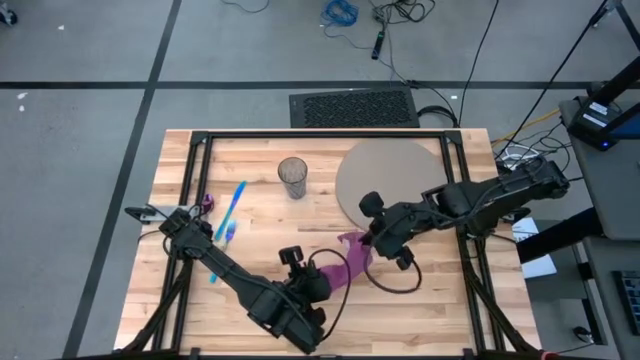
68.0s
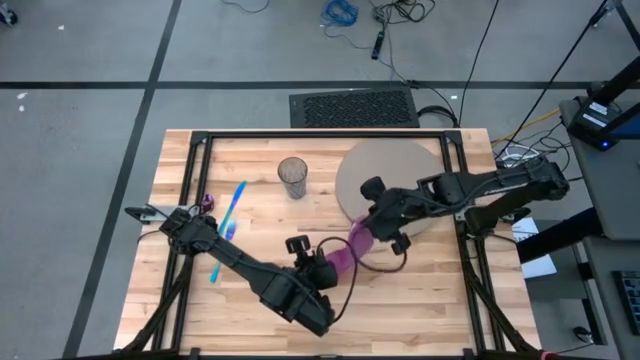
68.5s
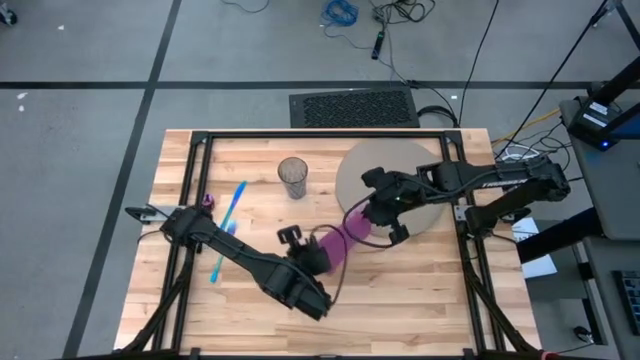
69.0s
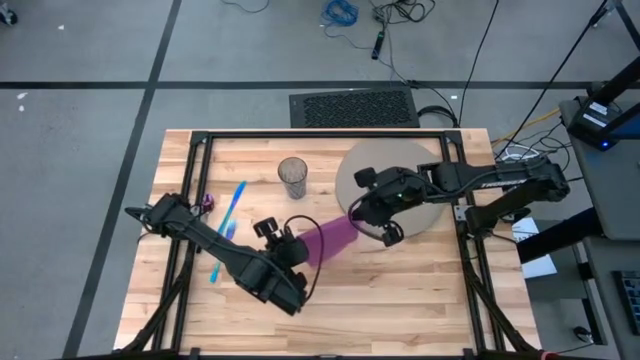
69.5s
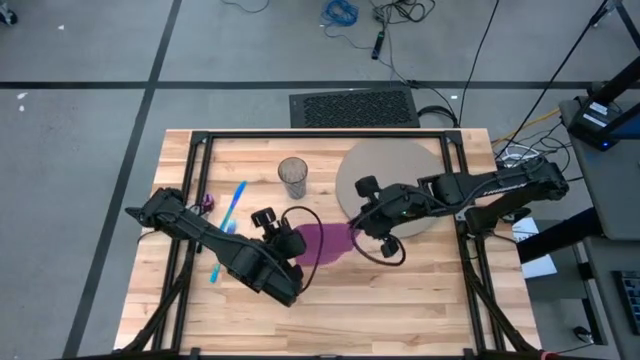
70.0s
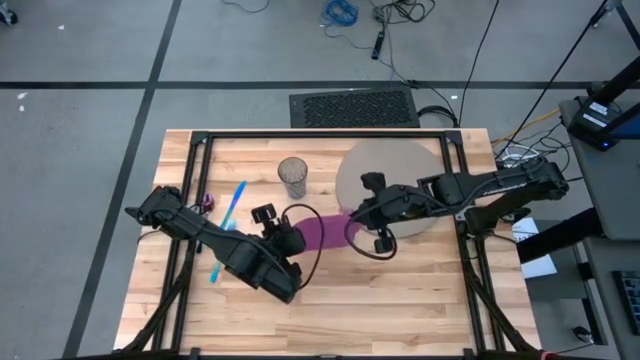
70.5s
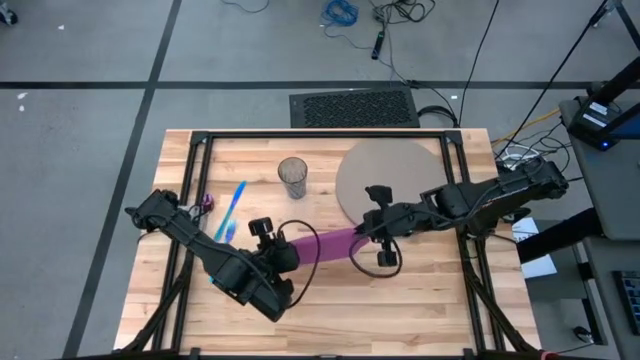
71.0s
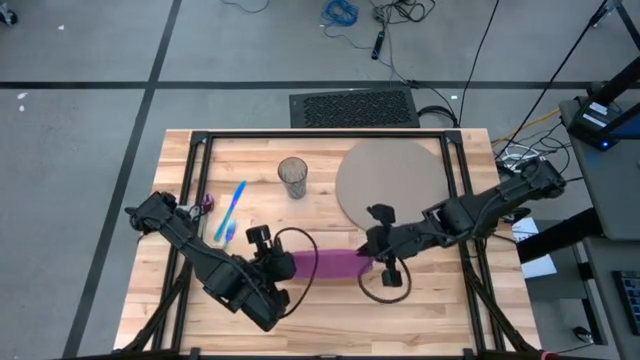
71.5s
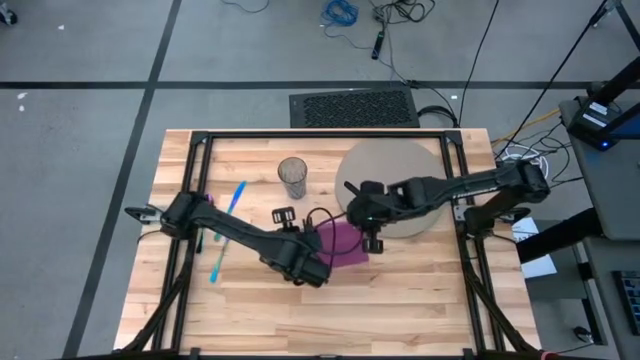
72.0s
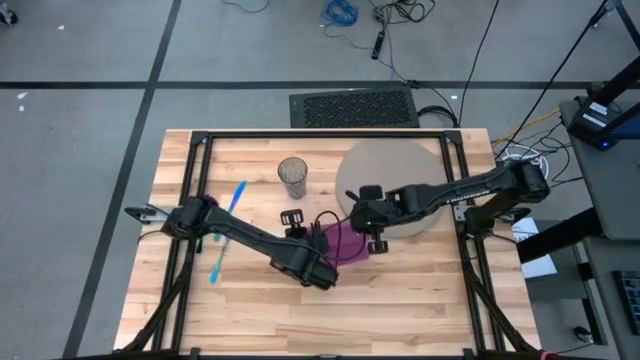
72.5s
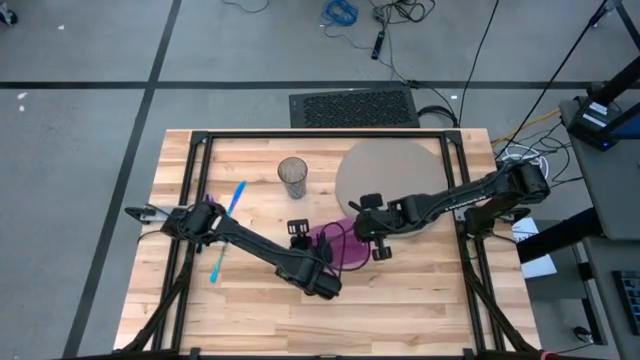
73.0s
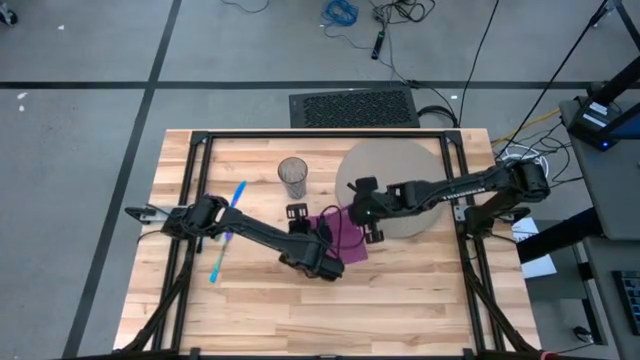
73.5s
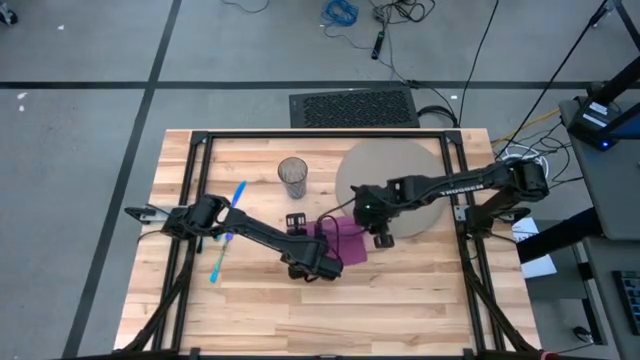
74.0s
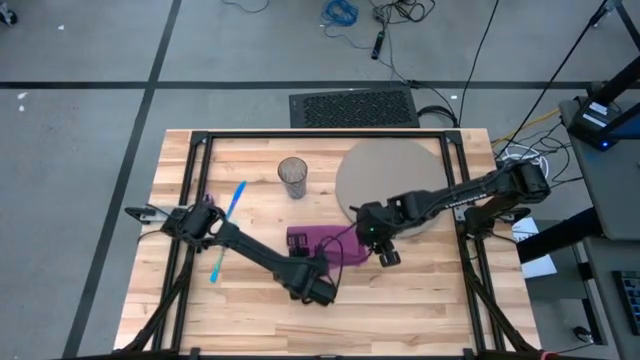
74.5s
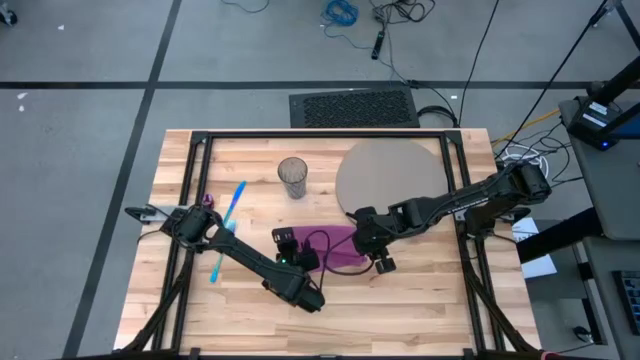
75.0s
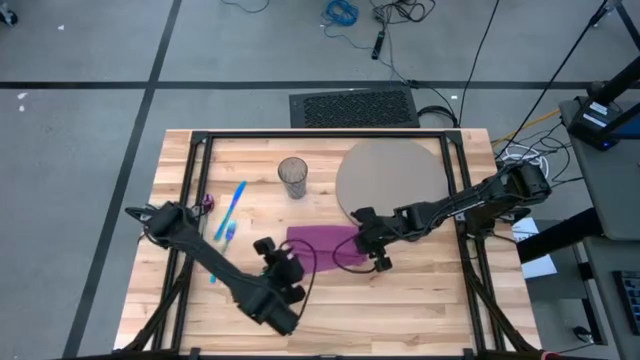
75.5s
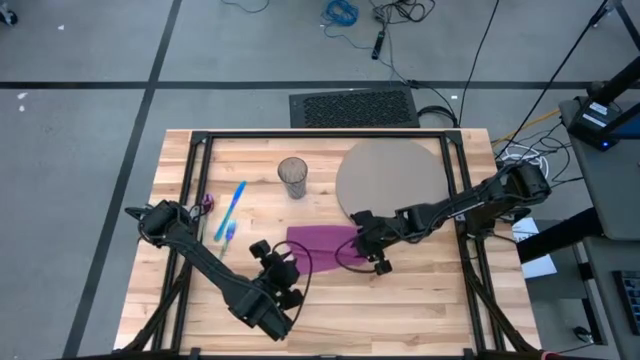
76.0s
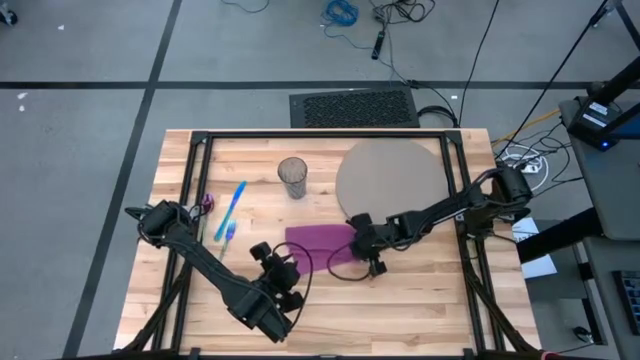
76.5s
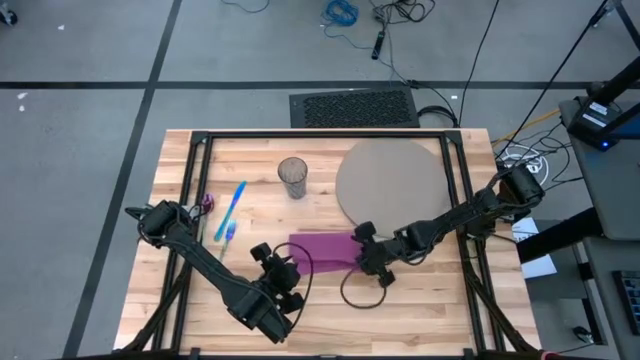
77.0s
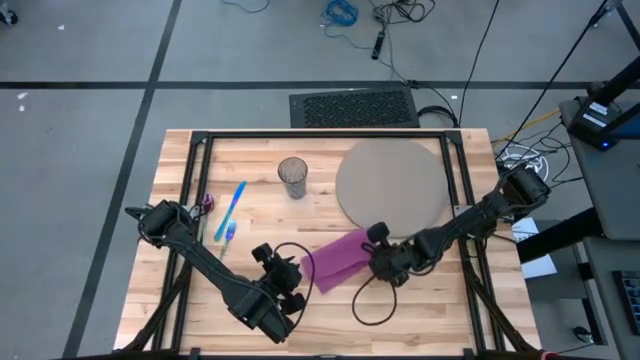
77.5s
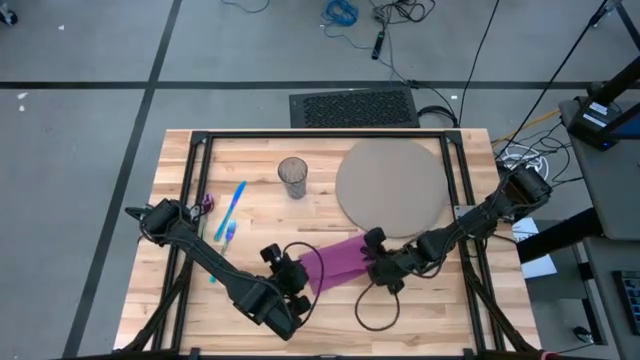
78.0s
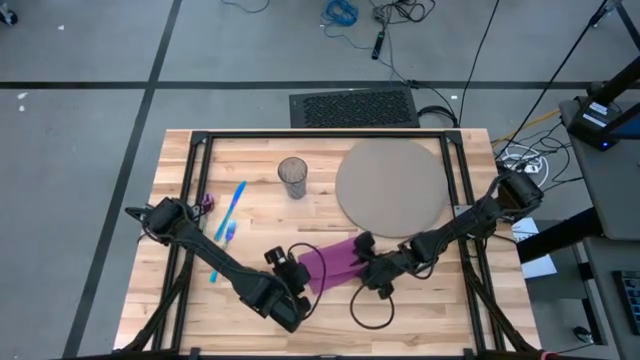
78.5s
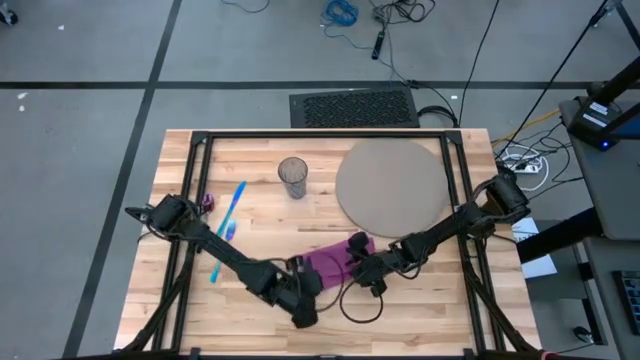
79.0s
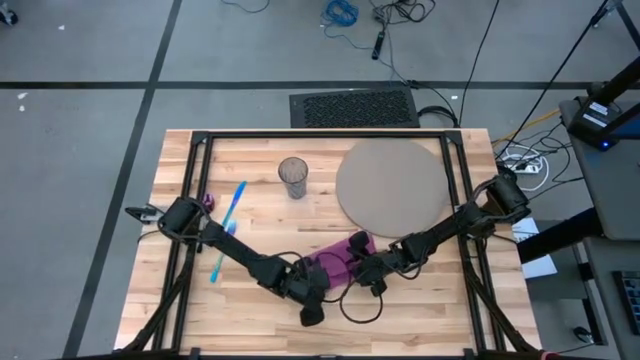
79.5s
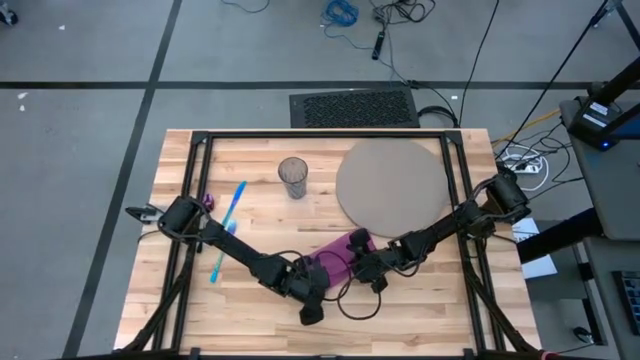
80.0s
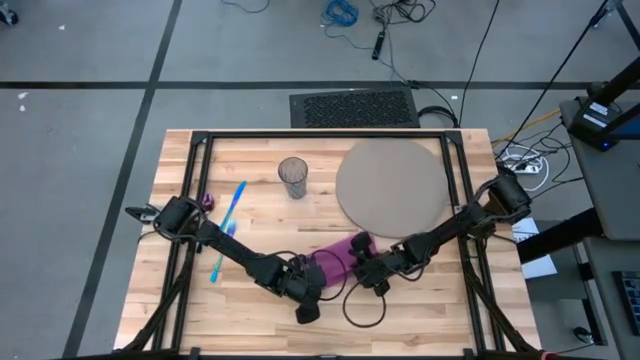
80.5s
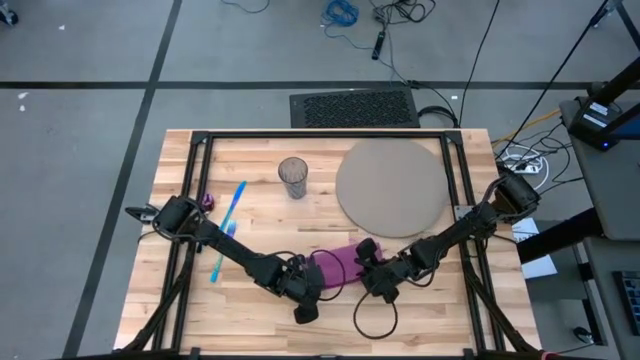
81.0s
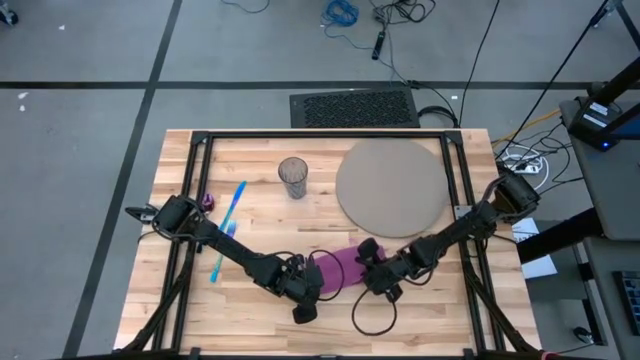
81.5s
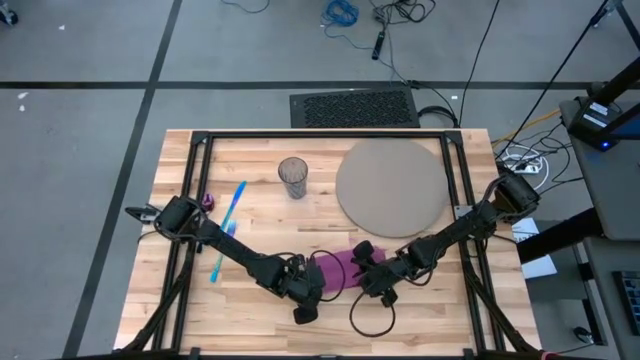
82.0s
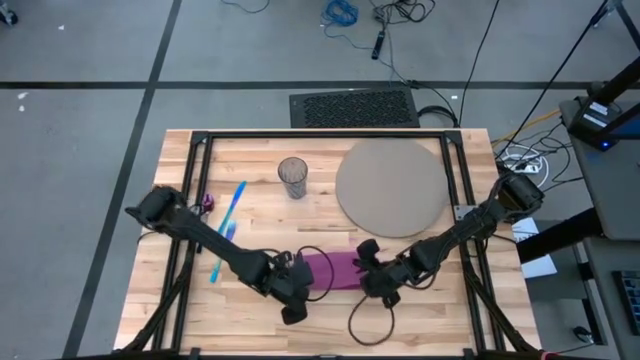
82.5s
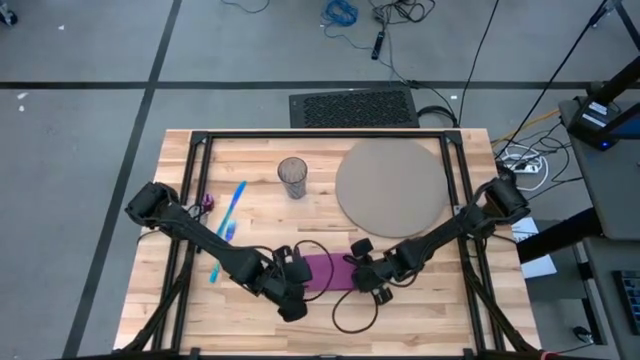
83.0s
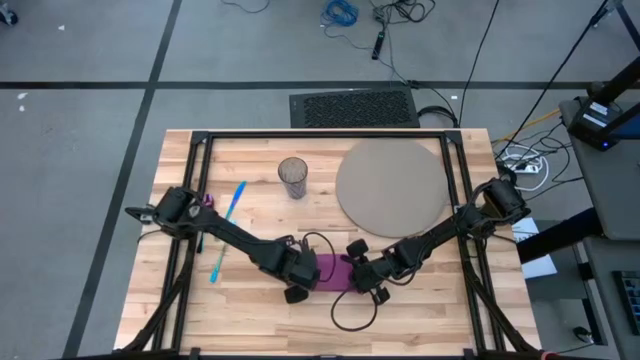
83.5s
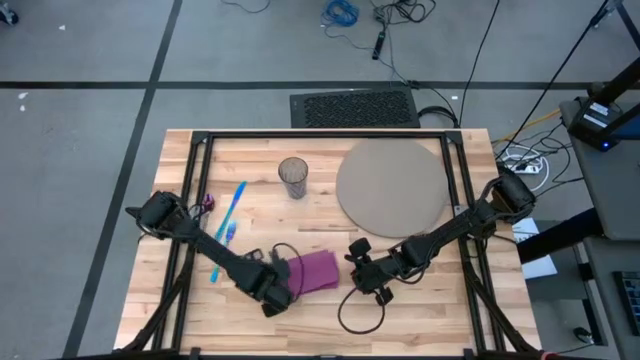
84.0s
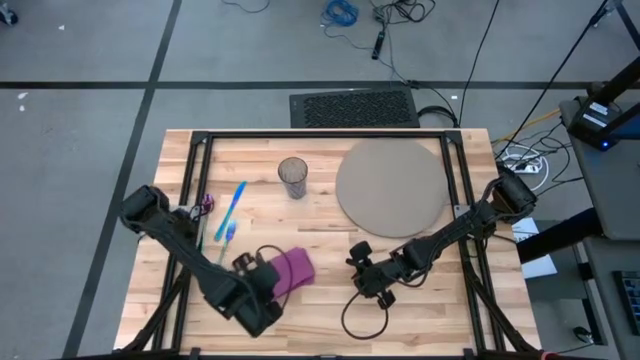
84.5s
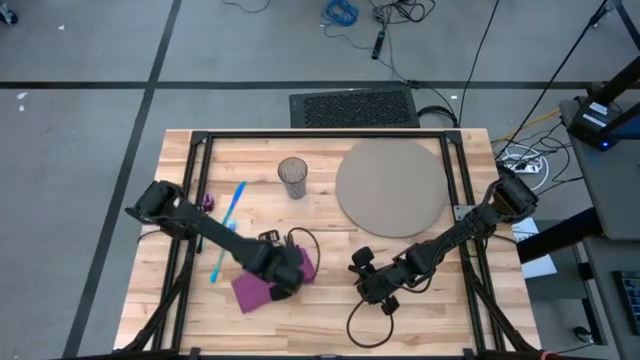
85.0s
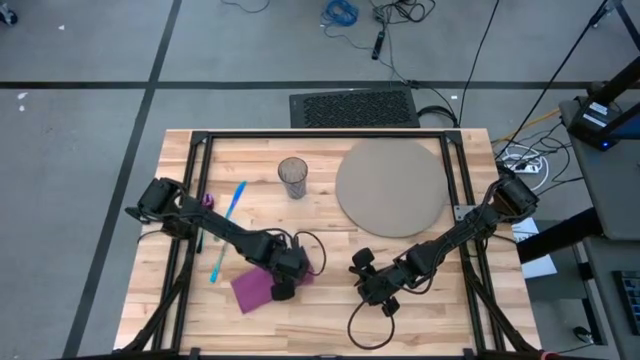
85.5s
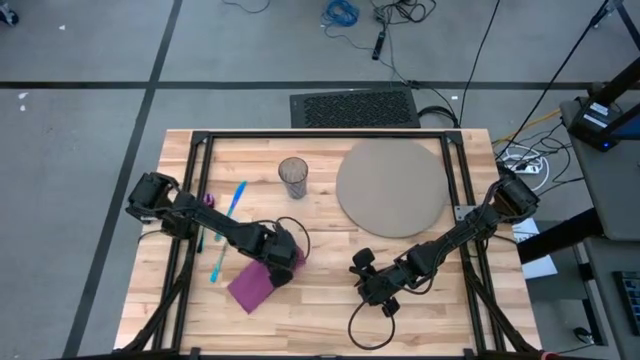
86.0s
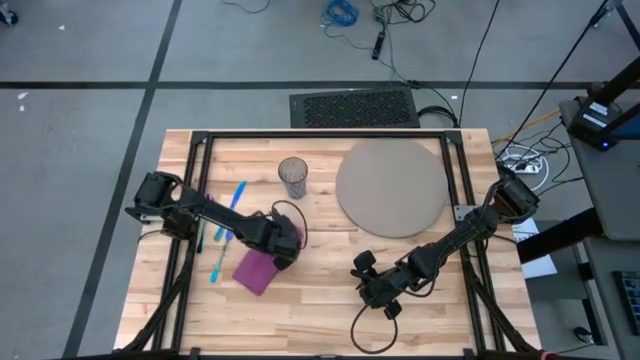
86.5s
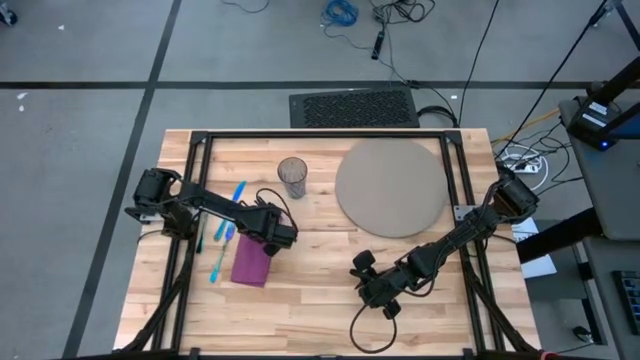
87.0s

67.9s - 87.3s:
Task: Set table place
Fold the pink table napkin

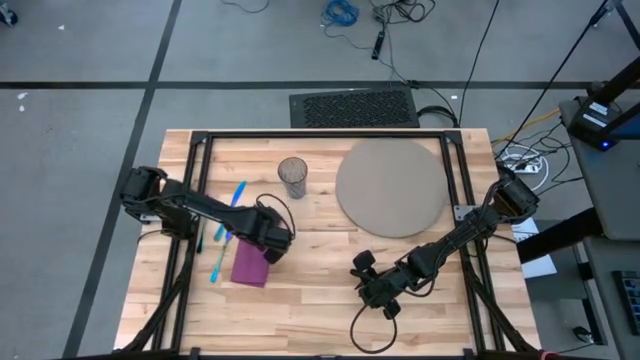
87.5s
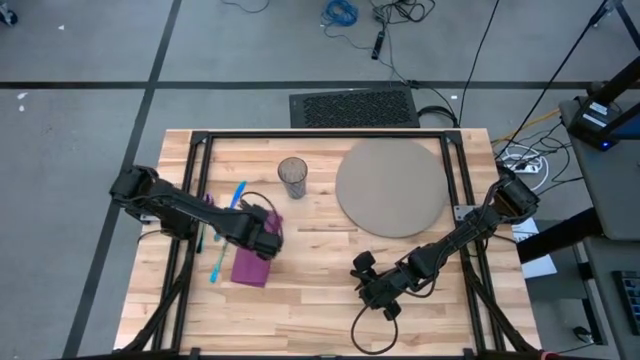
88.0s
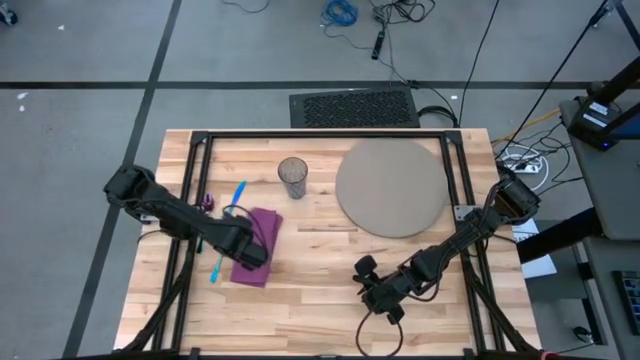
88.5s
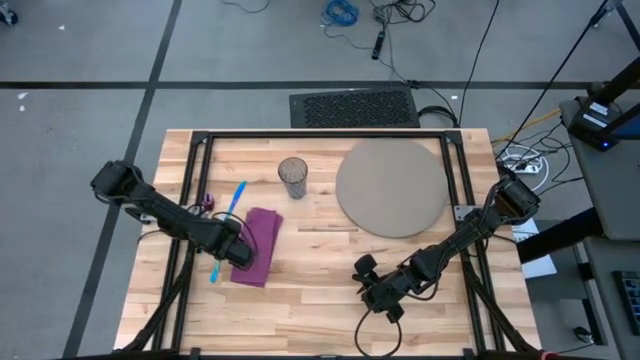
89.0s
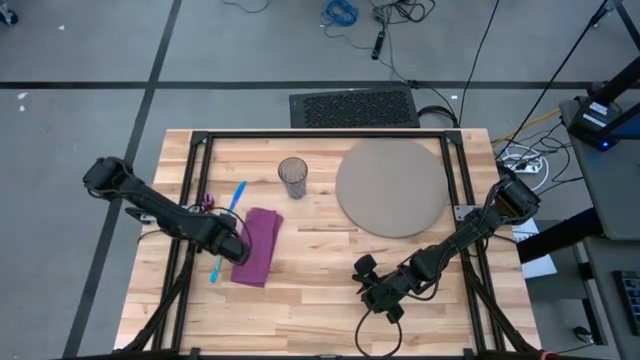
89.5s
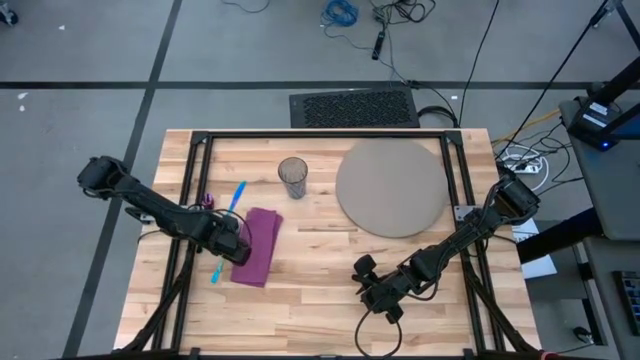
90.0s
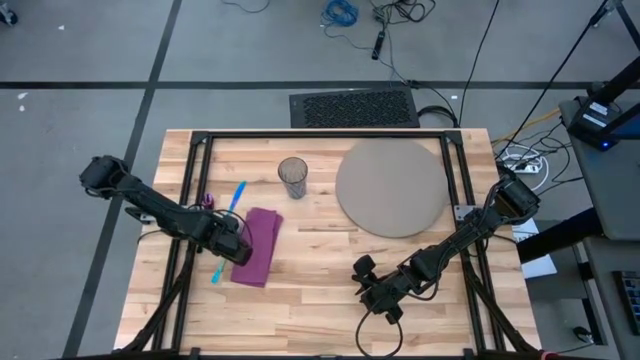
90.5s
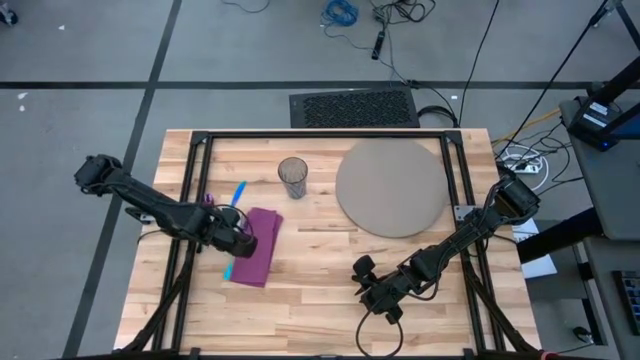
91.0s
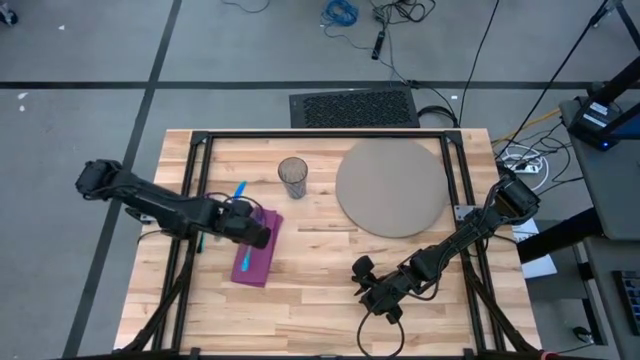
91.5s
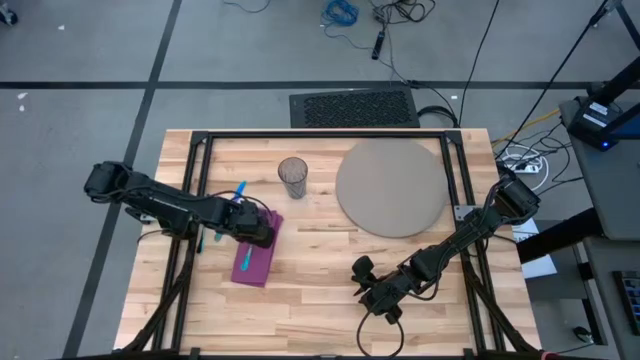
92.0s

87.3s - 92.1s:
Put the blue fork on the pink table napkin
